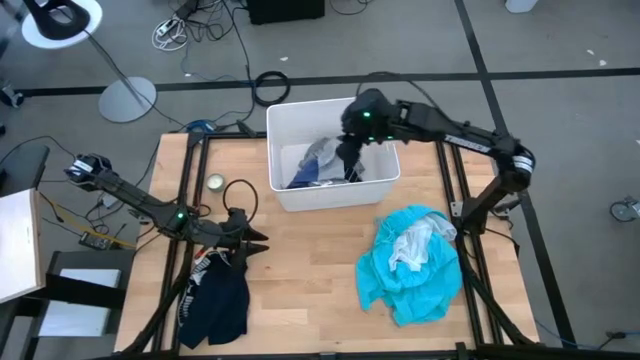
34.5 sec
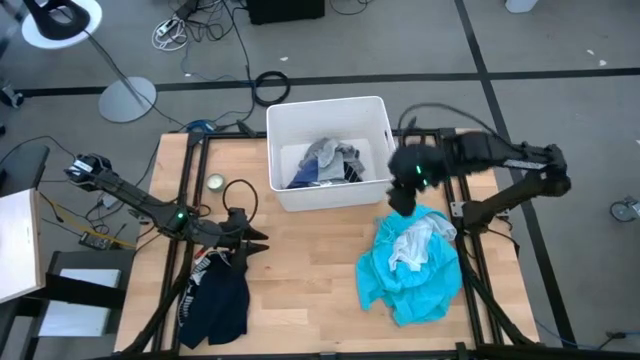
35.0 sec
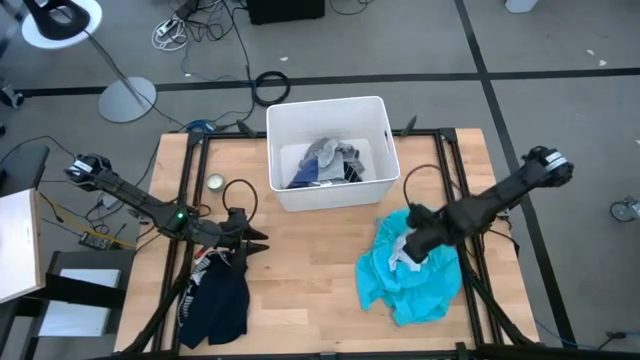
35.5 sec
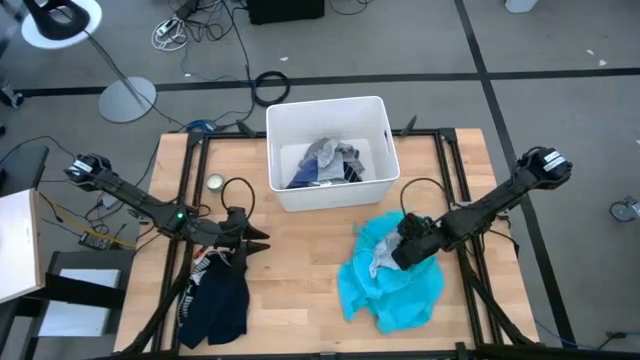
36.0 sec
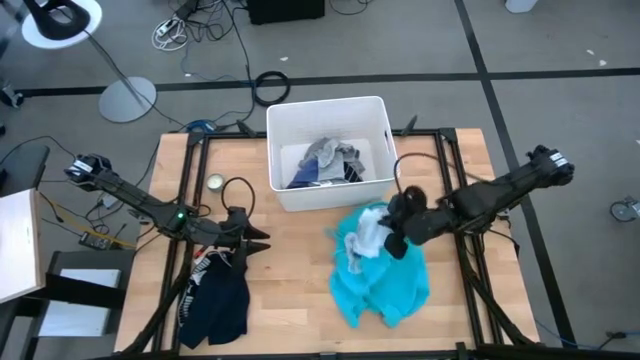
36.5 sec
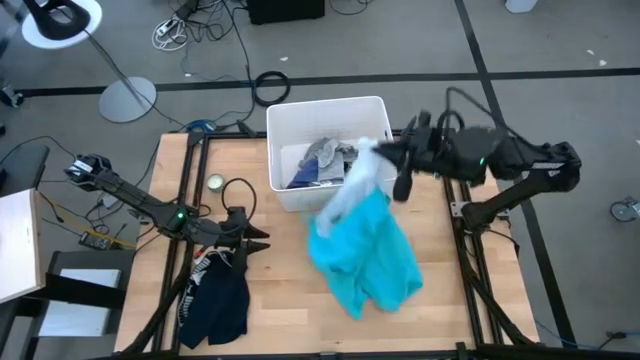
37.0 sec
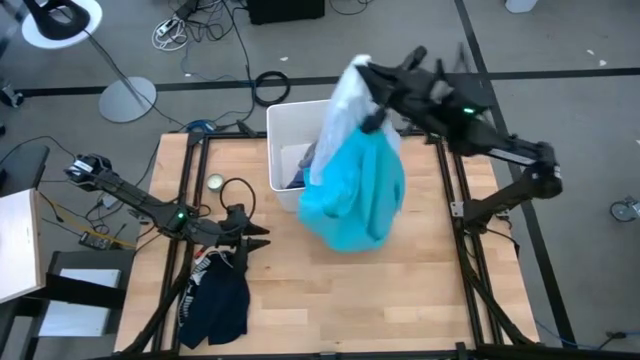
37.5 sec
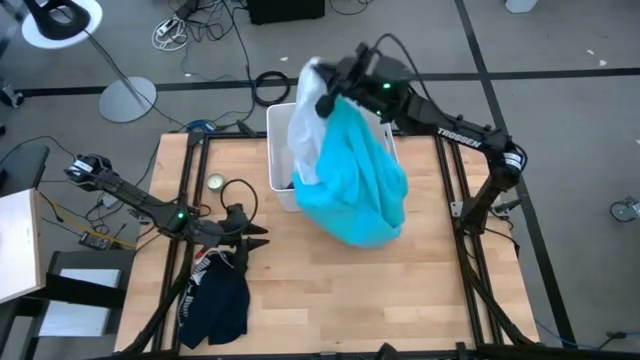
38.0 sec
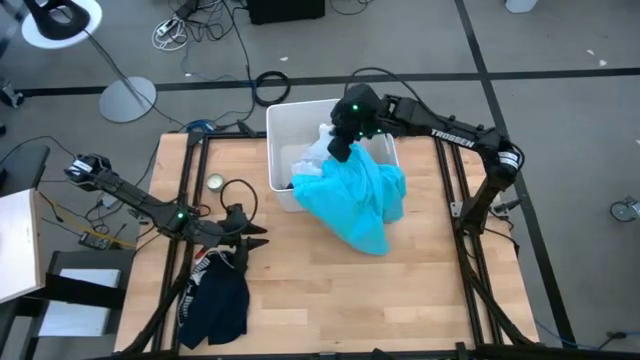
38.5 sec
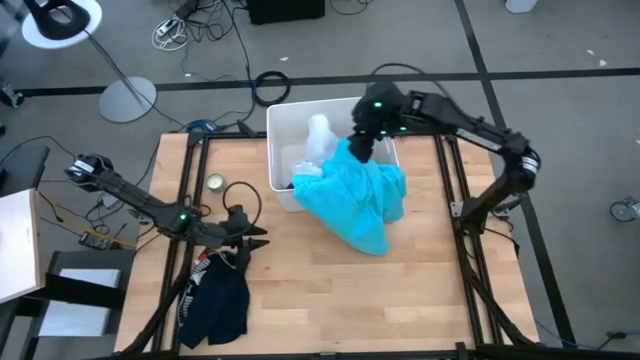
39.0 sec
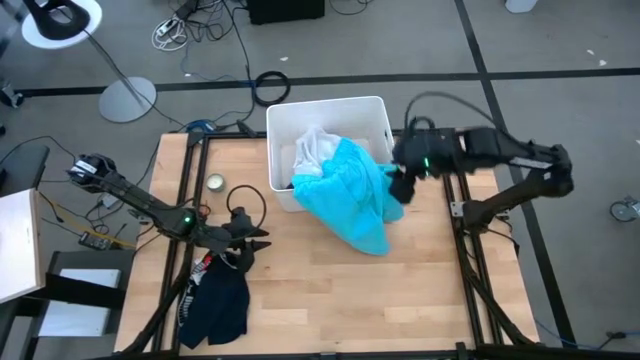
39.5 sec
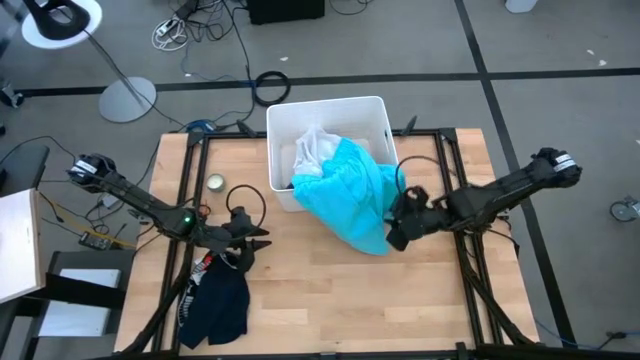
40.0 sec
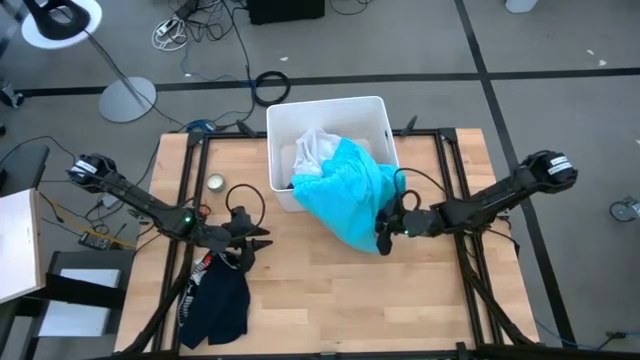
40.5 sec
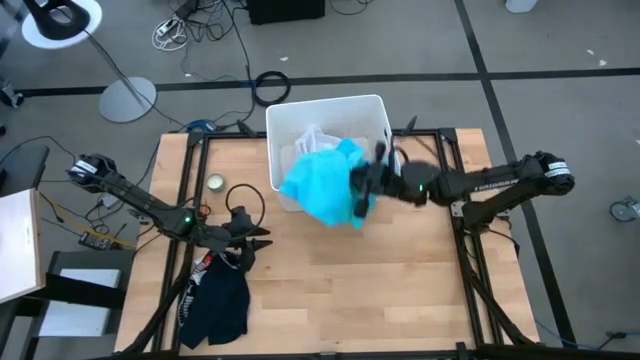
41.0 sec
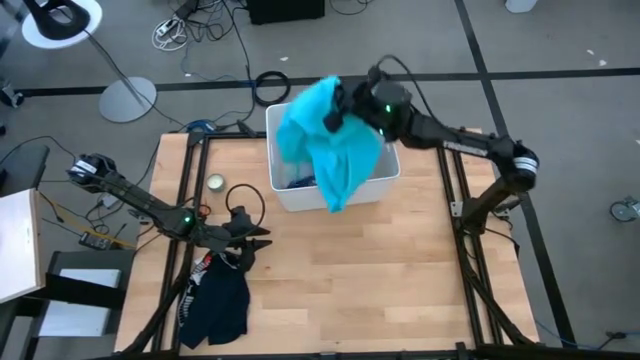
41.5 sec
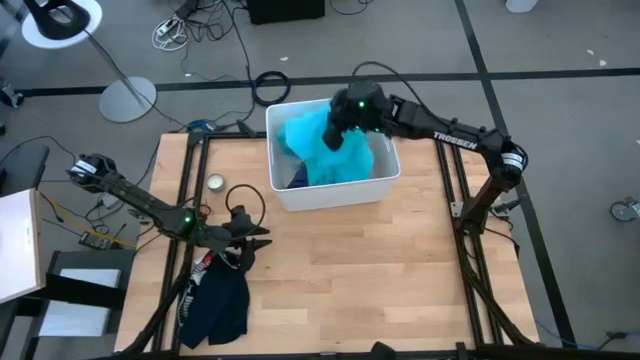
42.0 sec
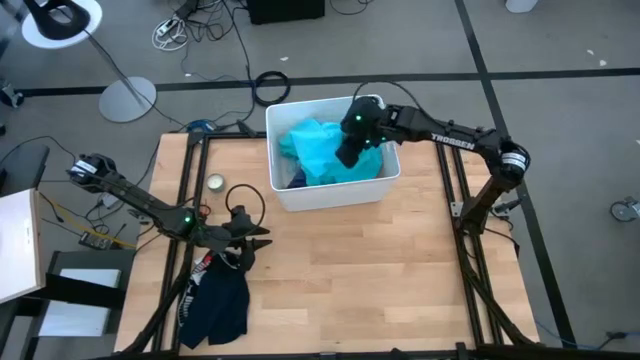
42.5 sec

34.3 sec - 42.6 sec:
Task: Sort clothes
Put the blue shorts into the white laundry organizer

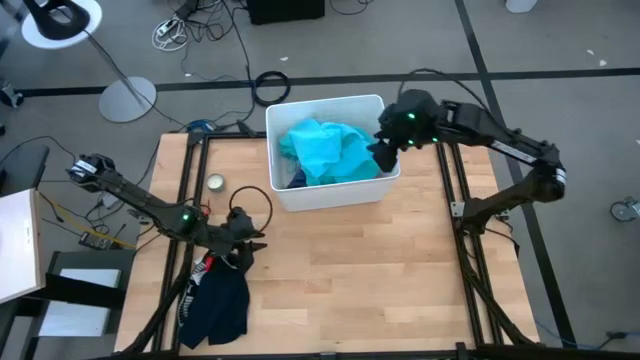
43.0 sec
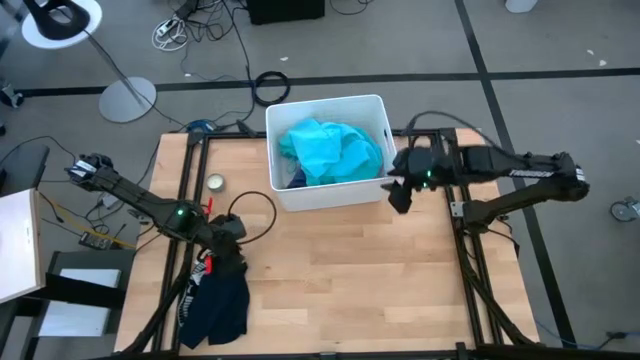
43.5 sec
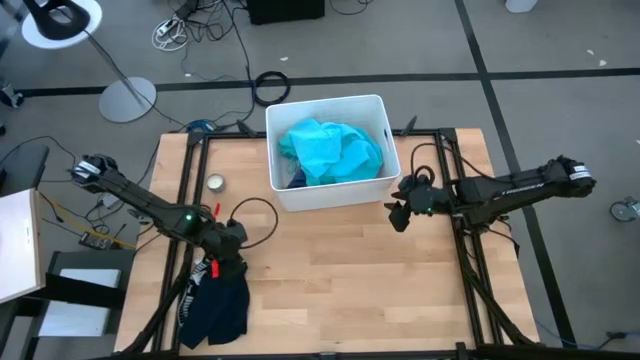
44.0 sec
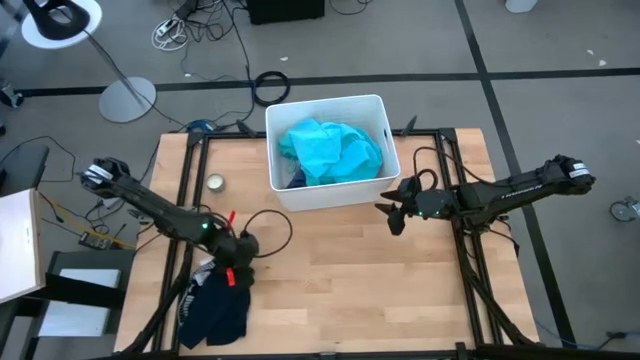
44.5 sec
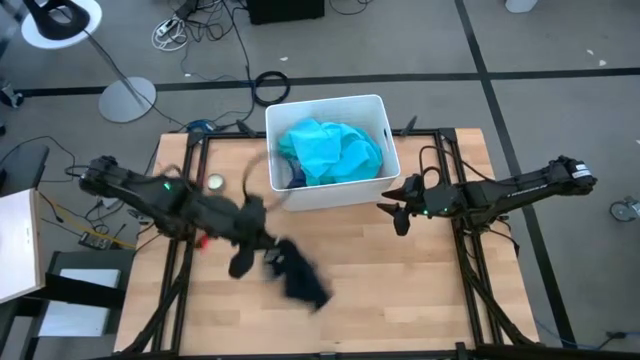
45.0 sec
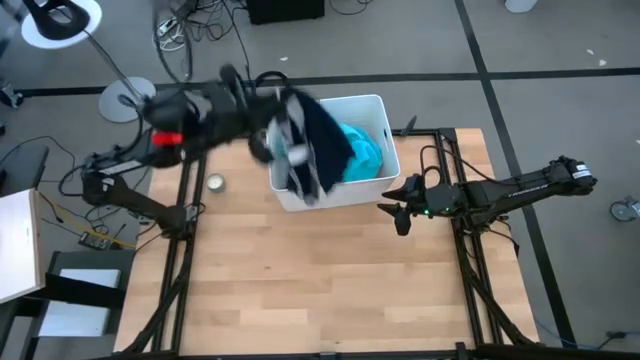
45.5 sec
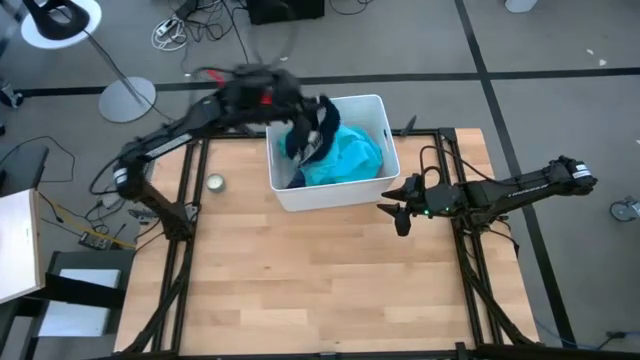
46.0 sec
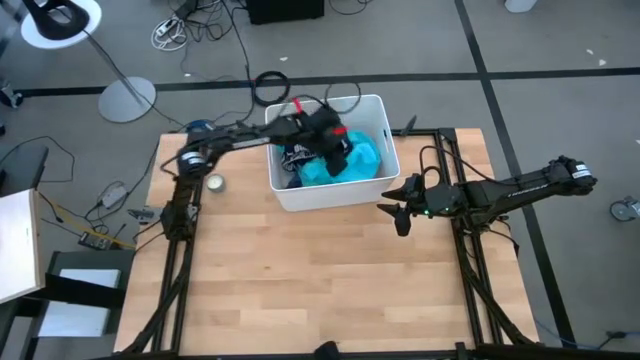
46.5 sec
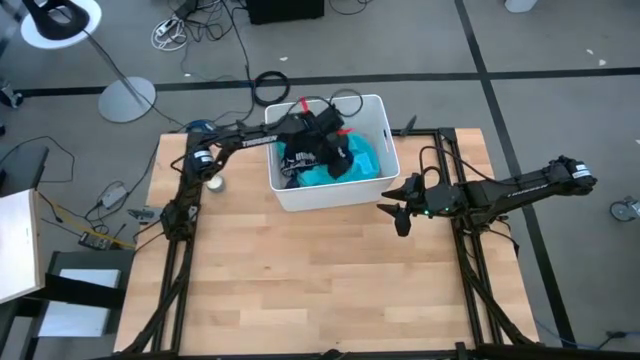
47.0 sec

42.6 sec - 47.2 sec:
Put the black underwear into the white laundry organizer

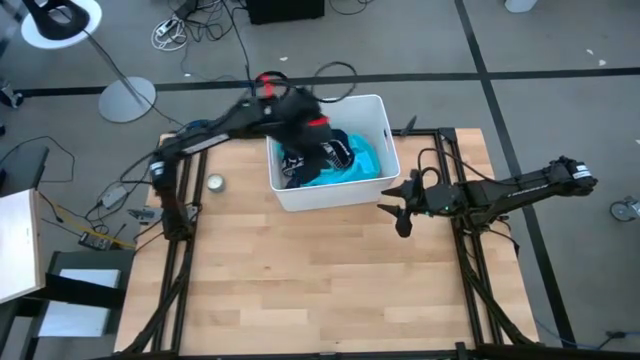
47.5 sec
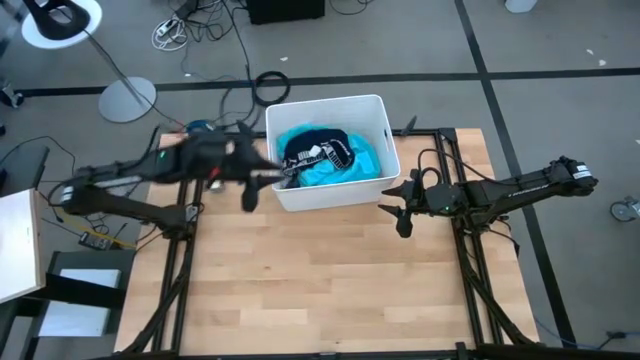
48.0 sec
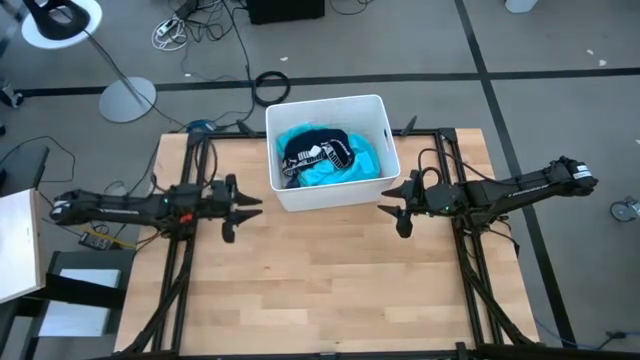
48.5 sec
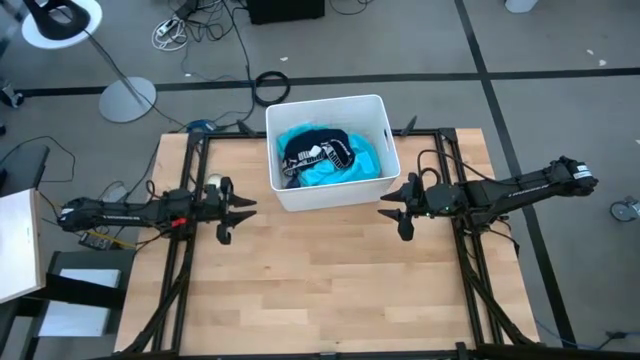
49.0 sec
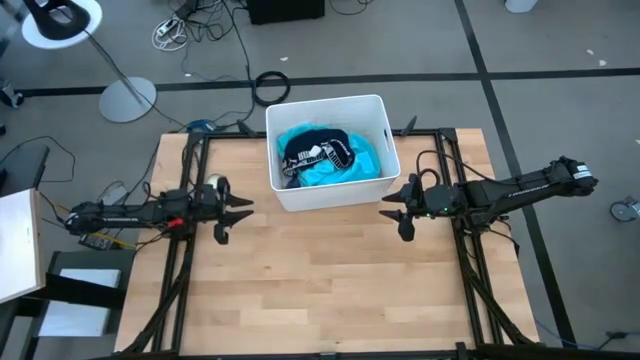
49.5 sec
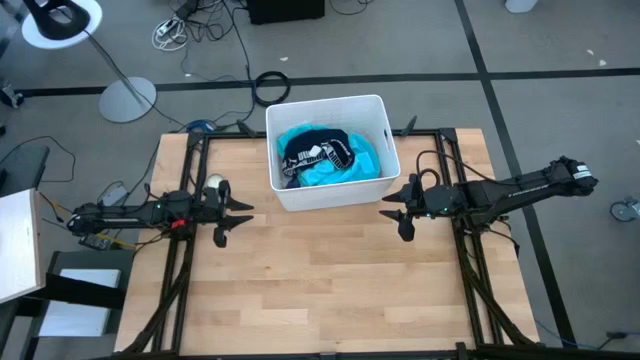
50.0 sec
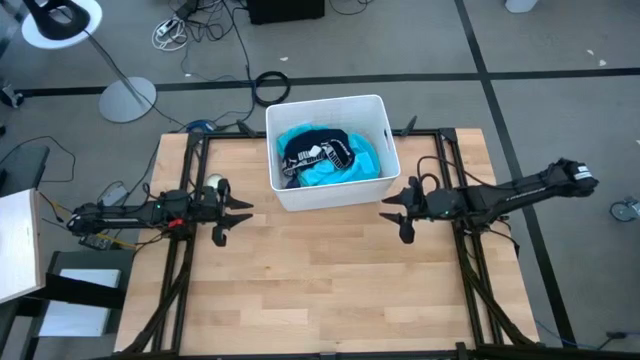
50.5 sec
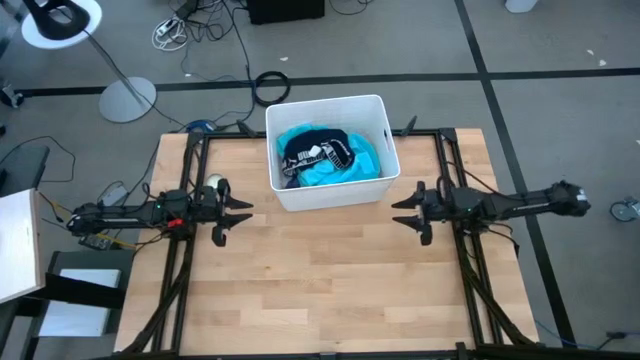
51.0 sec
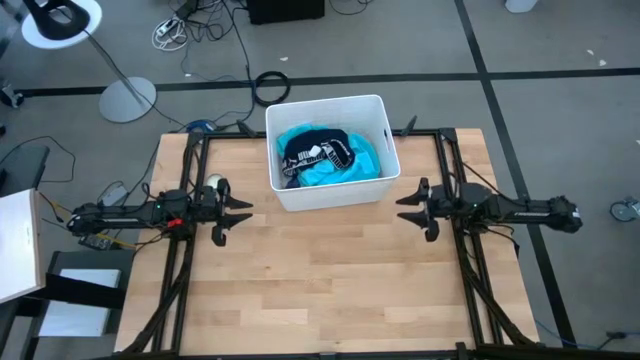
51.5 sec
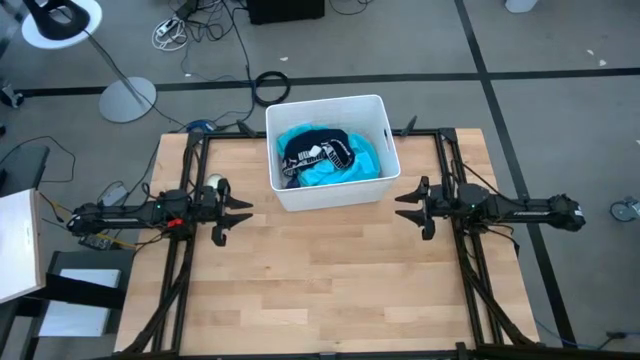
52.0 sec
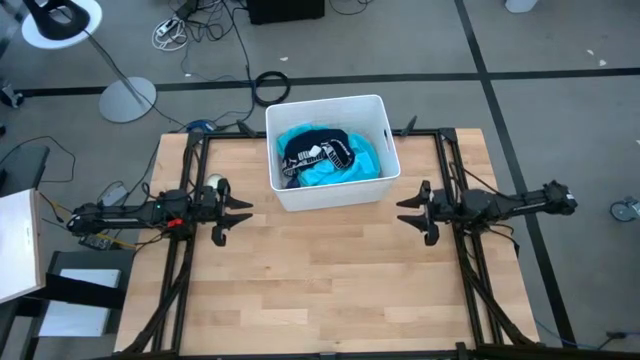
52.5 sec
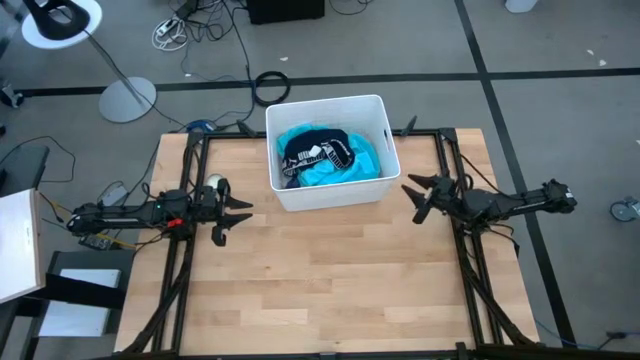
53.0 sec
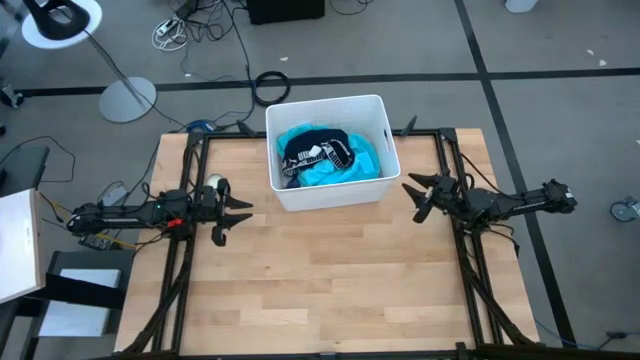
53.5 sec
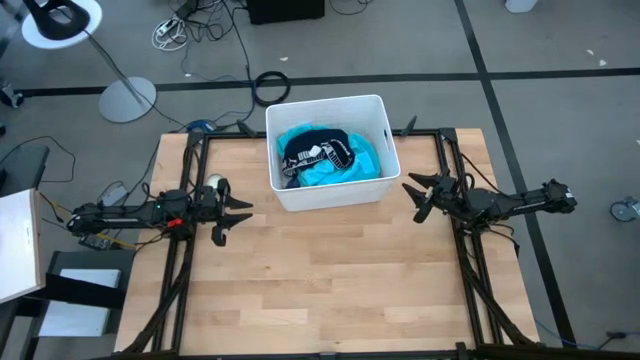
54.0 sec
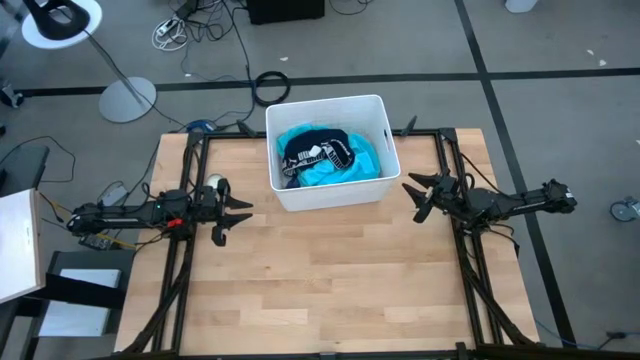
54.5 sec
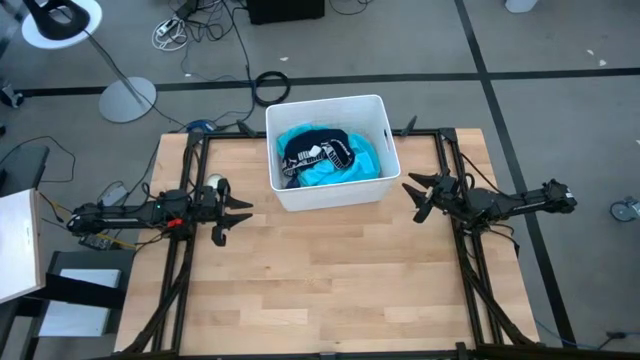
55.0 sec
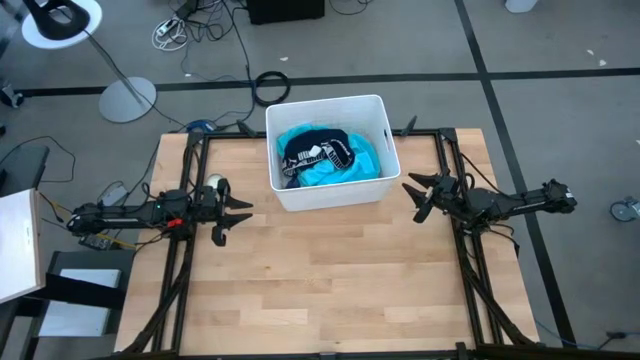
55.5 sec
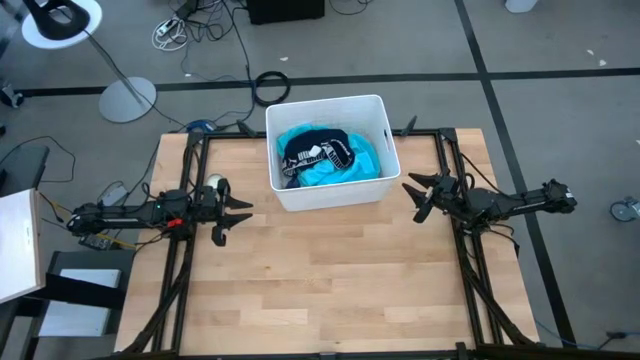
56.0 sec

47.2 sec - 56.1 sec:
Return to Home Position

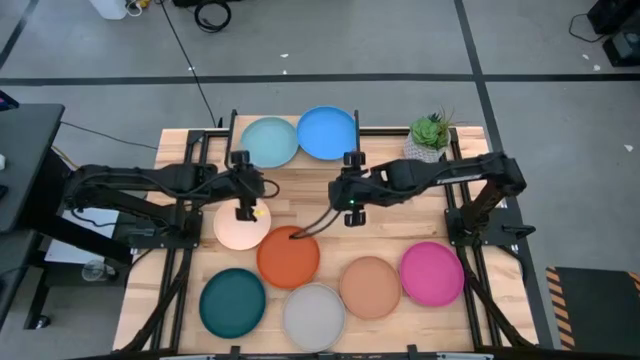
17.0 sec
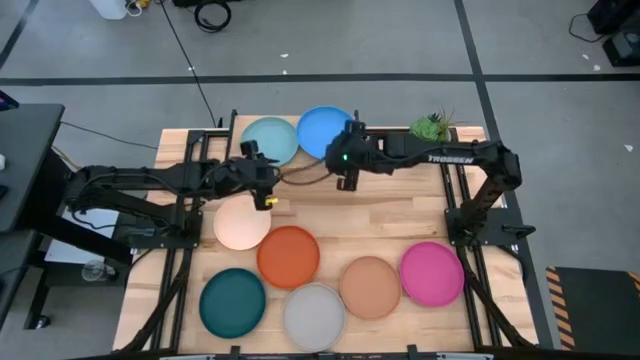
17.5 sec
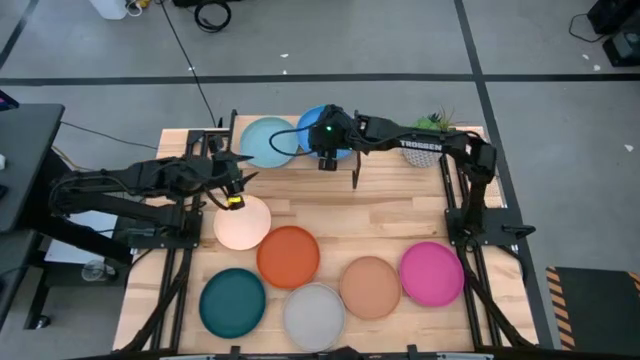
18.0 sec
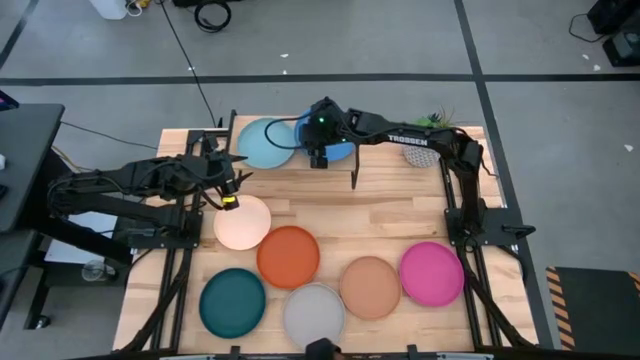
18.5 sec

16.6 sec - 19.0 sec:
Task: Place and stack plates onto a shelf
Adjust the blue plate on the shelf
